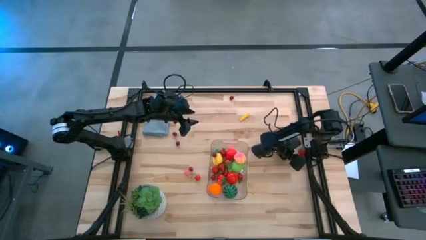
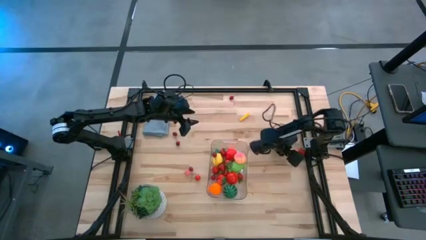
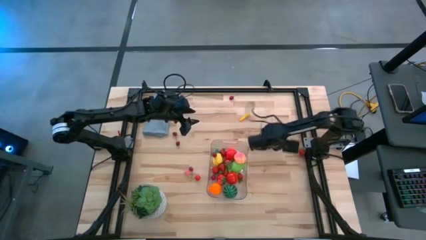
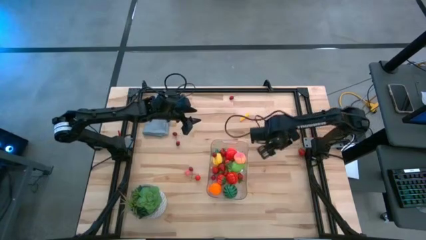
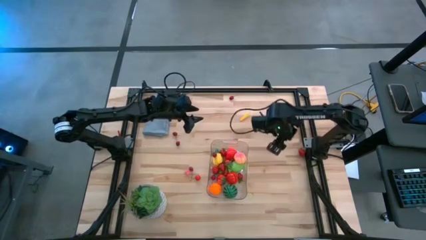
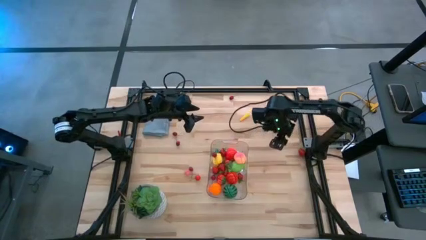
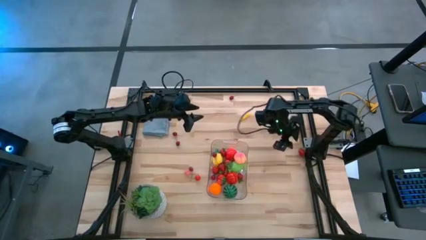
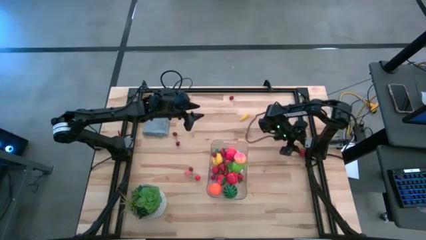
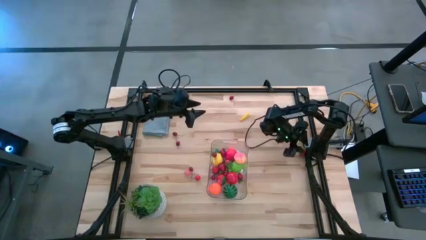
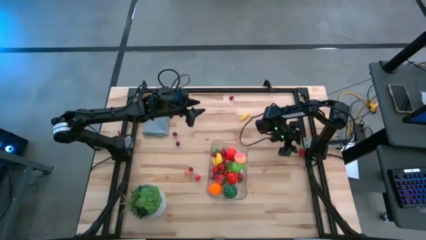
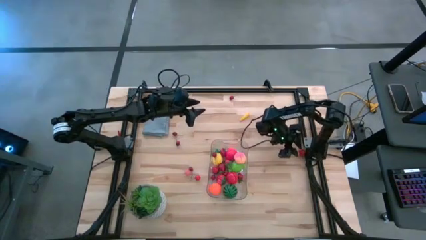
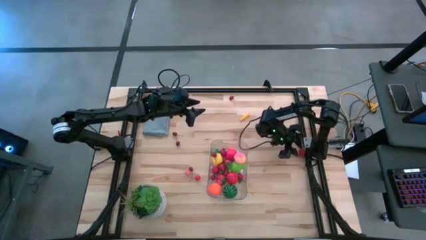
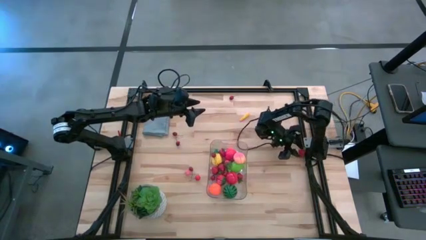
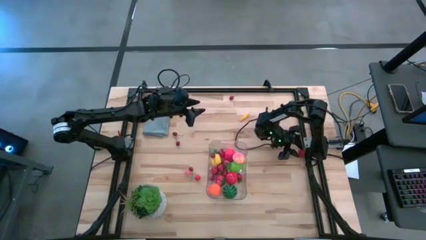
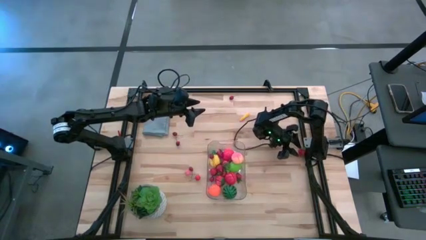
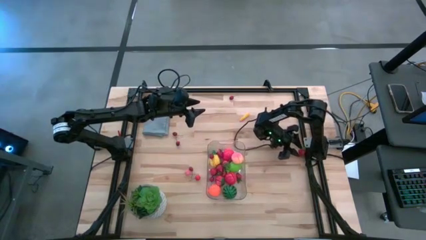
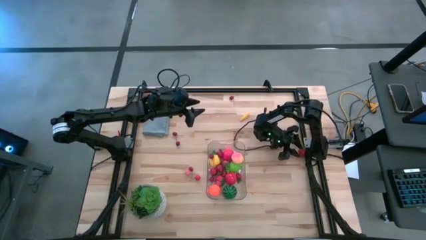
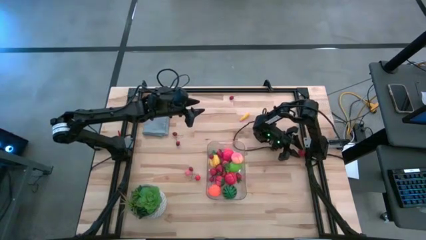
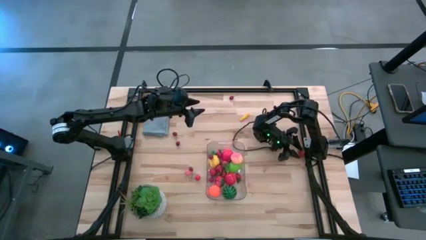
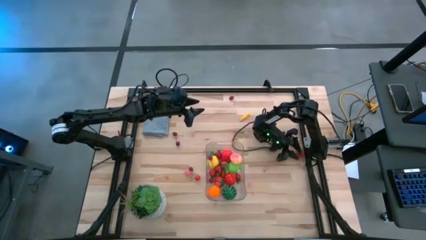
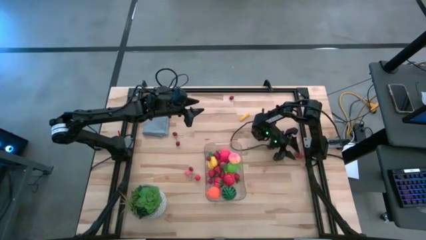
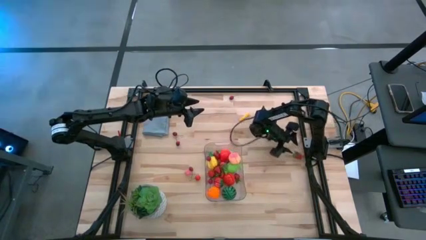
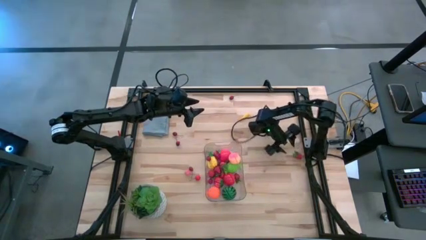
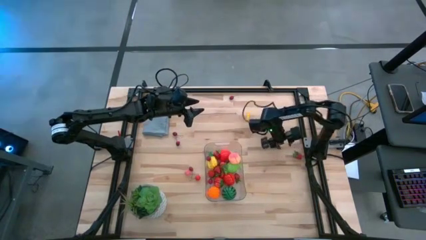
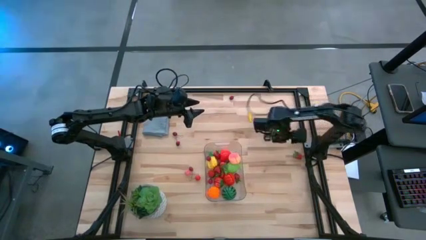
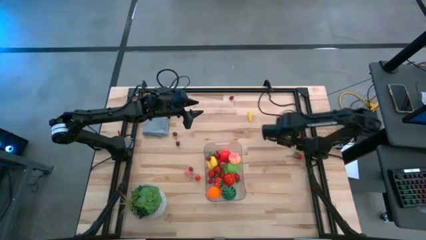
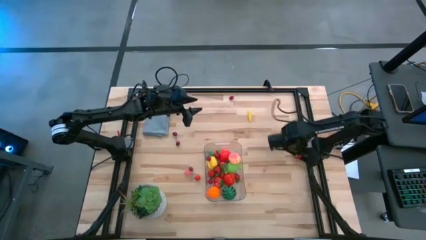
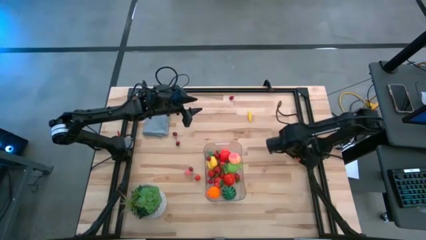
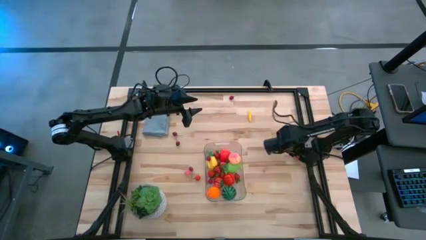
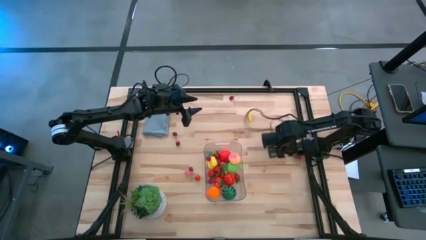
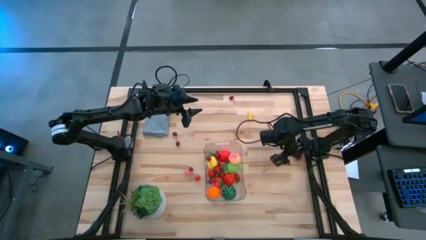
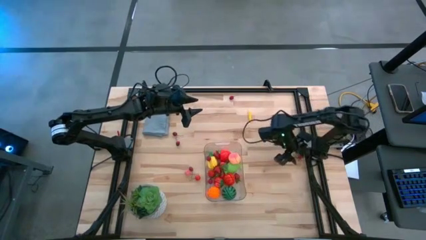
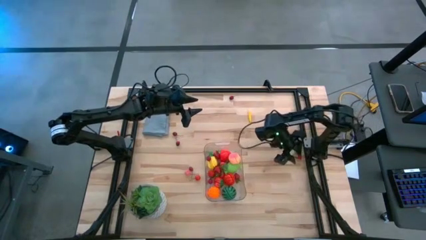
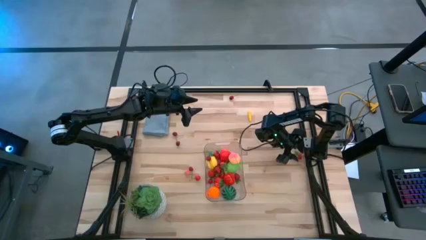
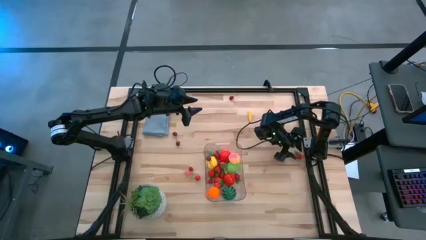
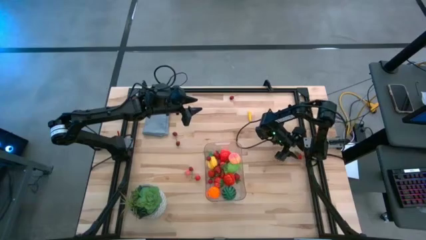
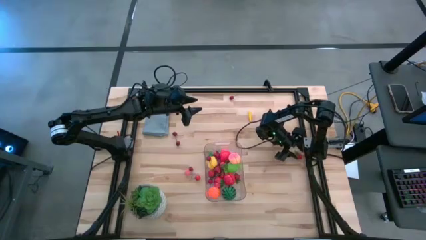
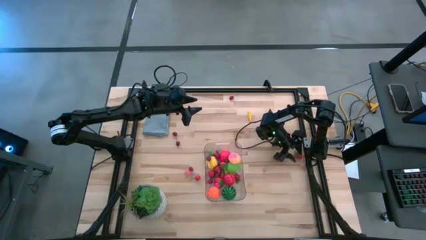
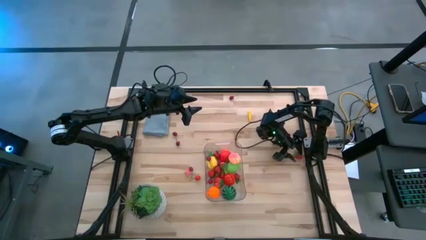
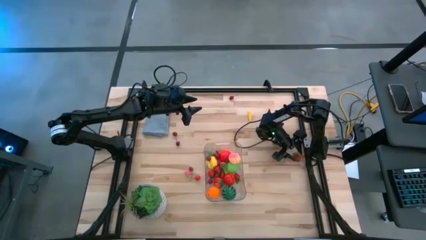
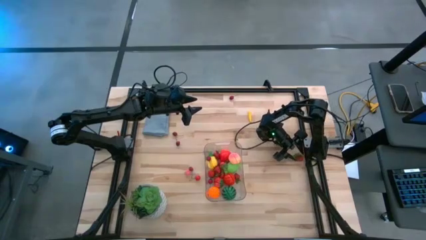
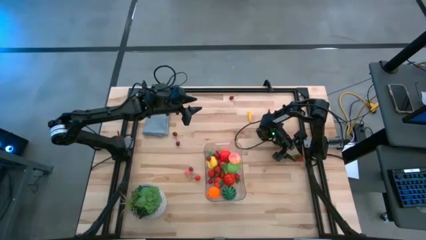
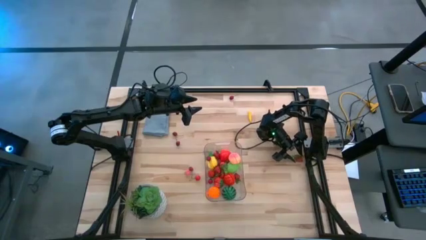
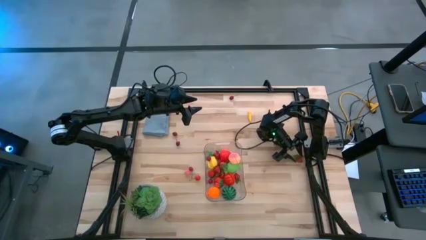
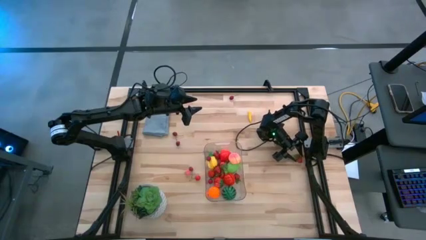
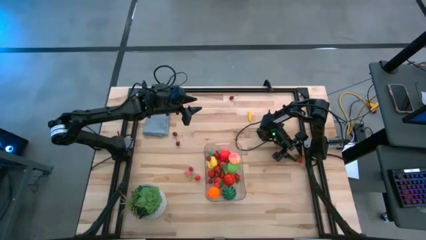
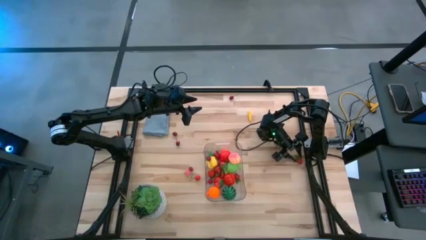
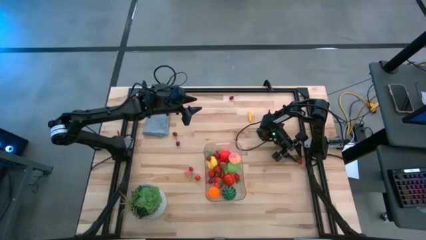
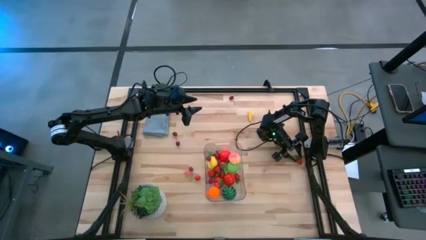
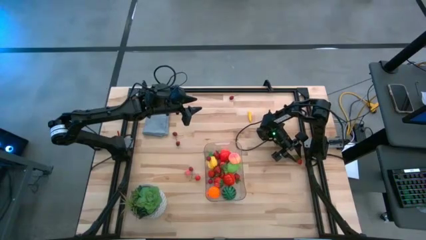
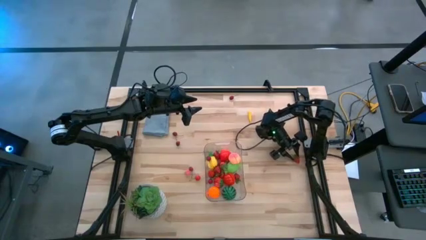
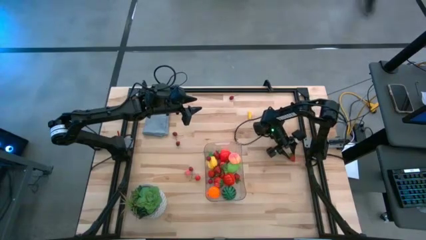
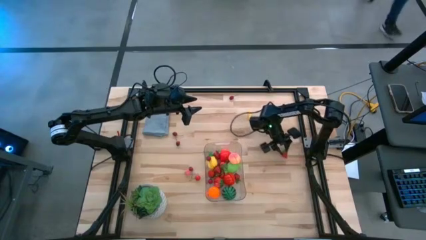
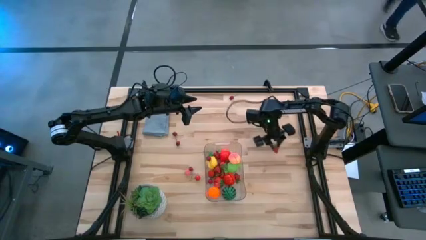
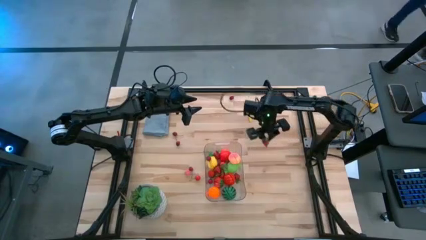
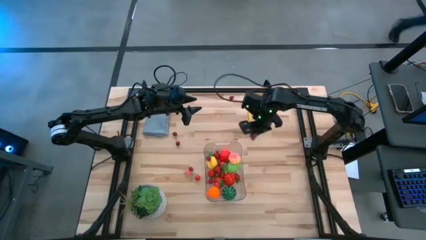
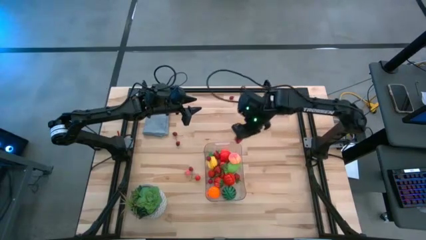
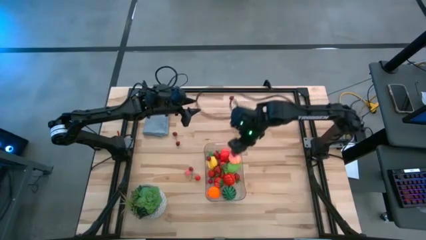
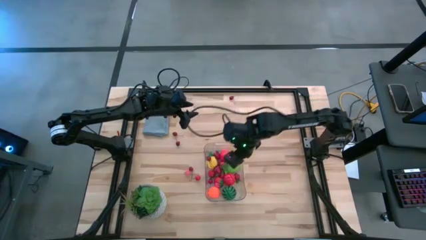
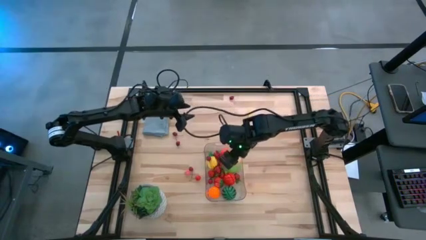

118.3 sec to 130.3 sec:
Task: Pick and placing Produce into tupperware
Put the strawberry into the transparent bin

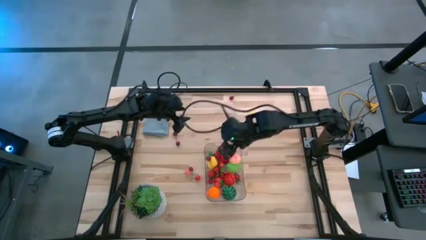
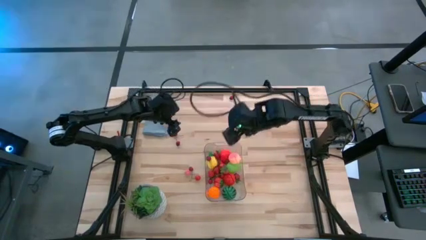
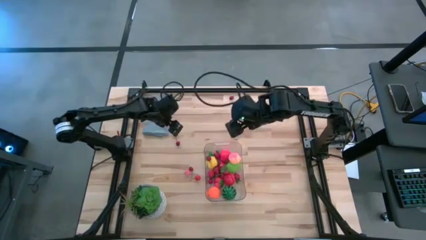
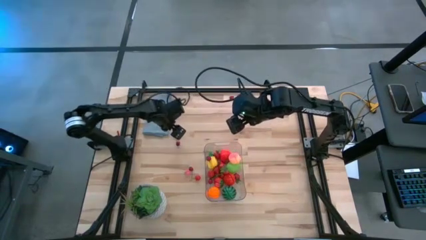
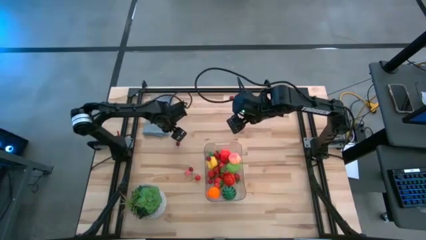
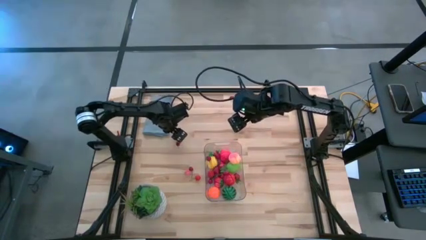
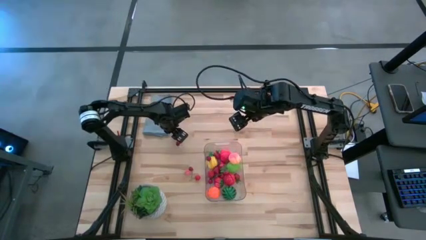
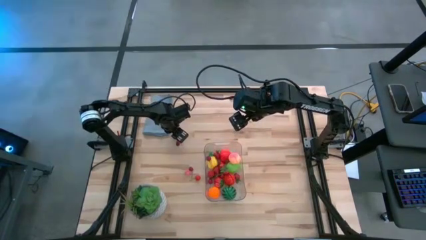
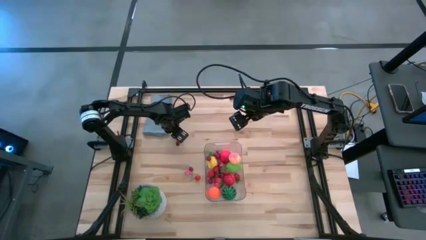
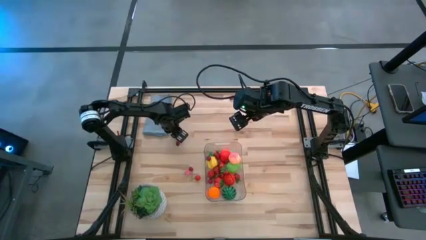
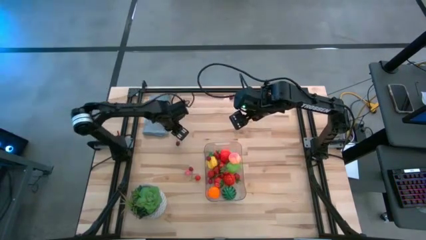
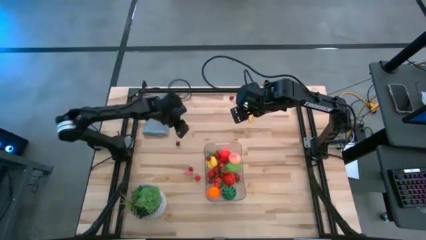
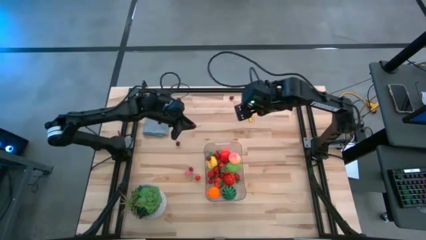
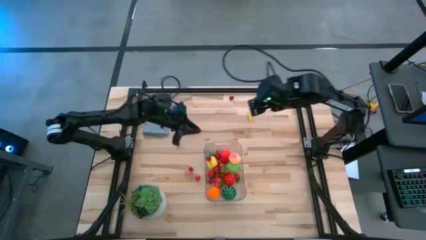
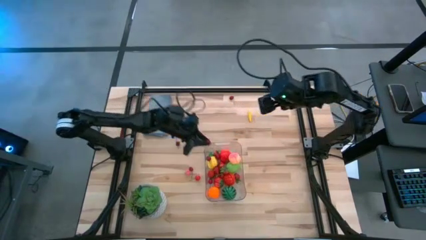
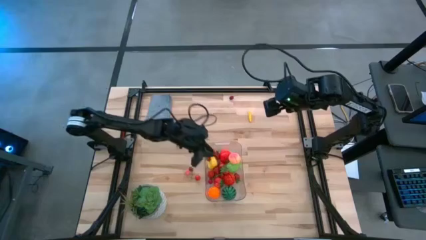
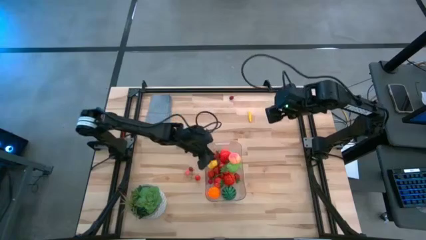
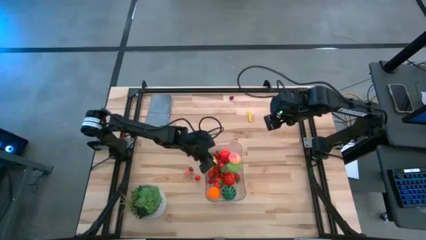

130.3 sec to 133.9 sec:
Put the cherry into the transparent bin

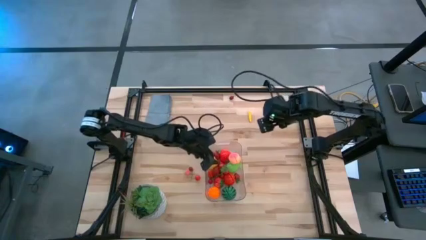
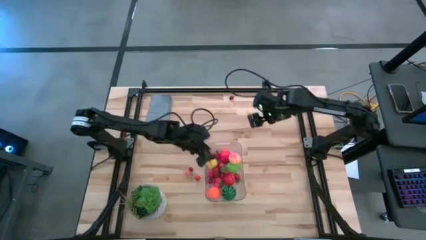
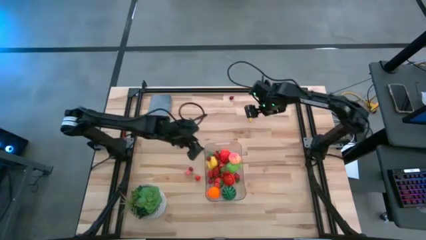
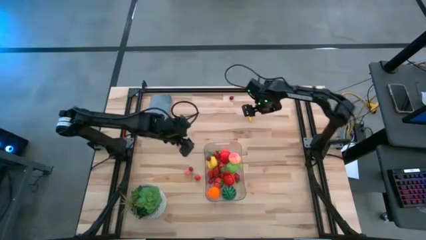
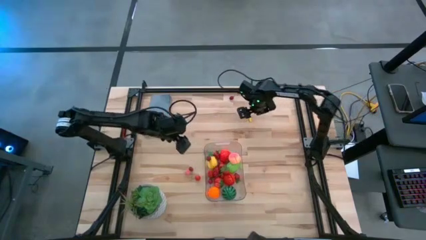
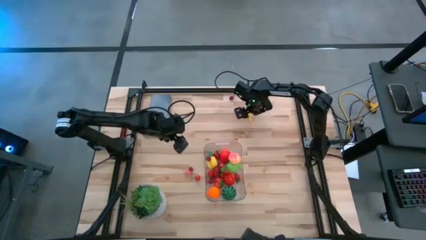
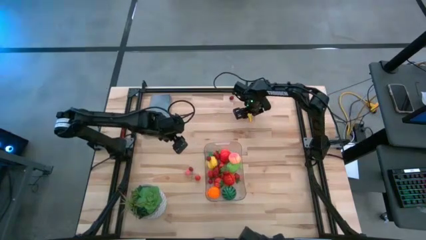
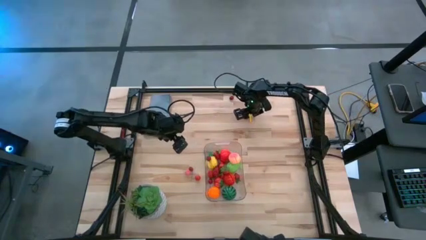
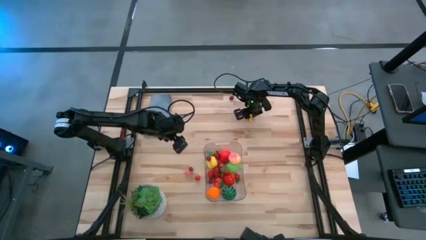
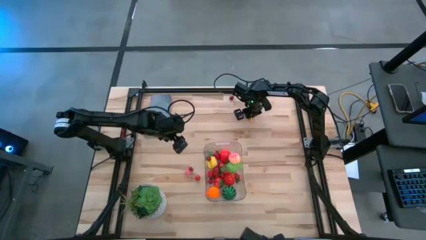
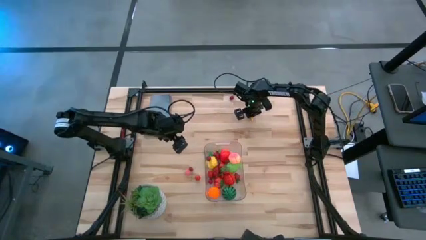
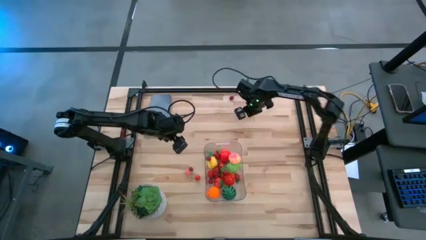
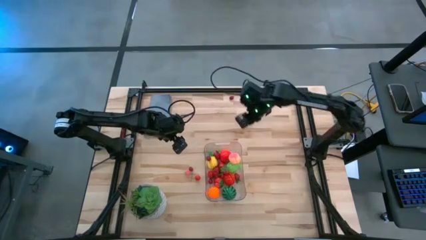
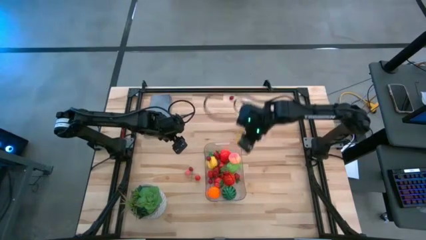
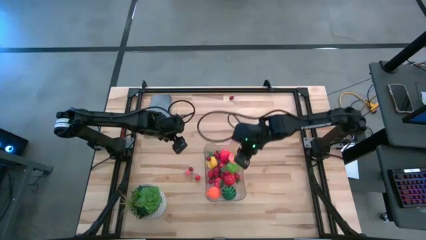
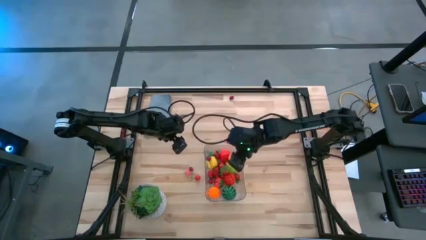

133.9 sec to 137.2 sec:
Put the chilli pepper into the transparent bin
